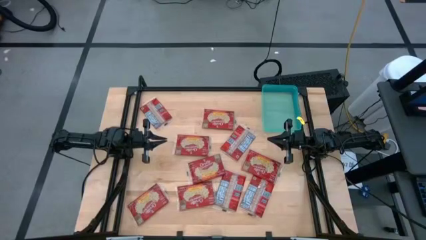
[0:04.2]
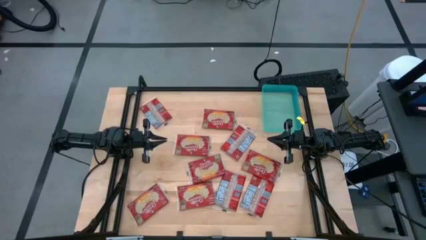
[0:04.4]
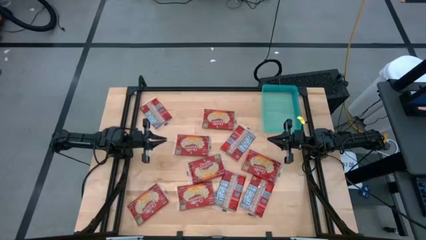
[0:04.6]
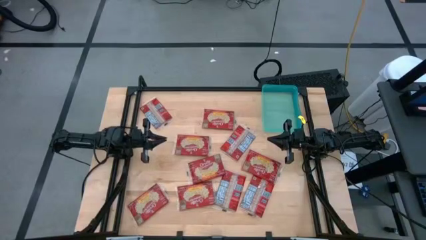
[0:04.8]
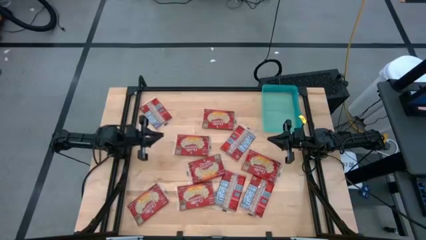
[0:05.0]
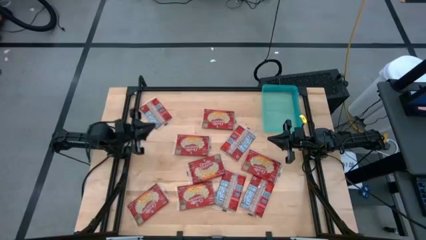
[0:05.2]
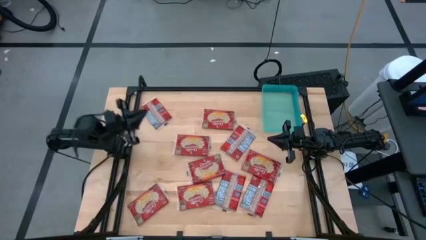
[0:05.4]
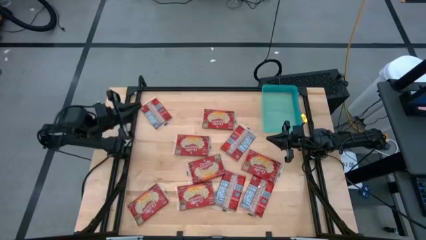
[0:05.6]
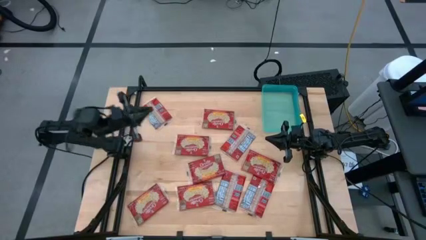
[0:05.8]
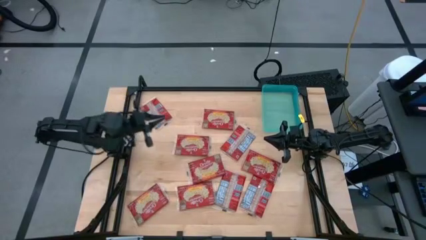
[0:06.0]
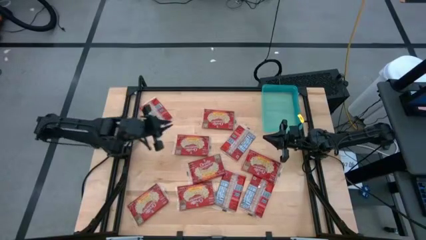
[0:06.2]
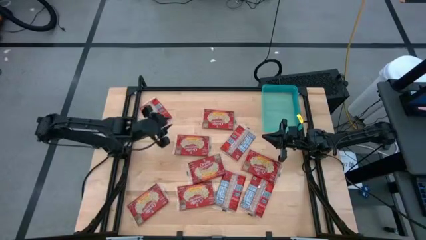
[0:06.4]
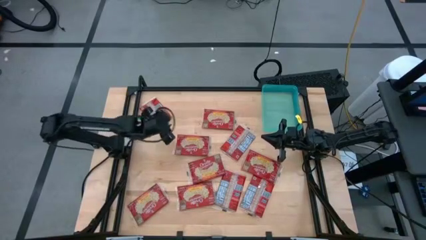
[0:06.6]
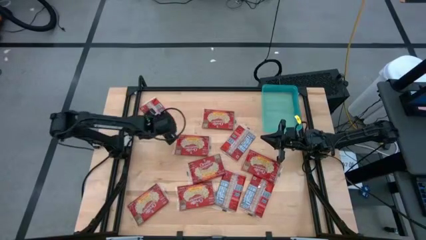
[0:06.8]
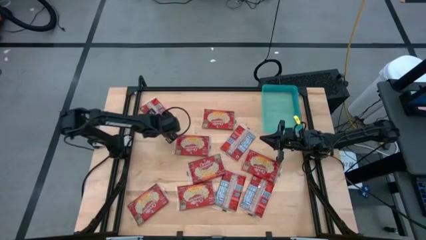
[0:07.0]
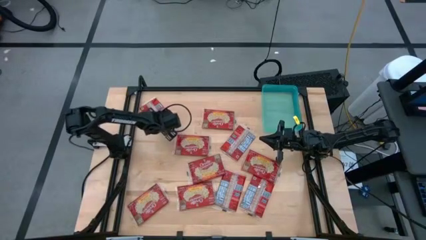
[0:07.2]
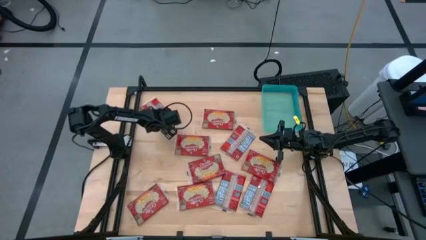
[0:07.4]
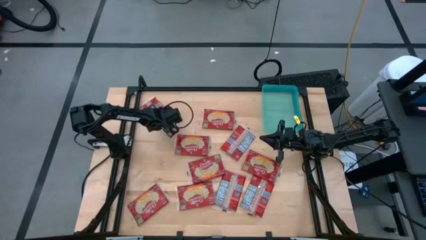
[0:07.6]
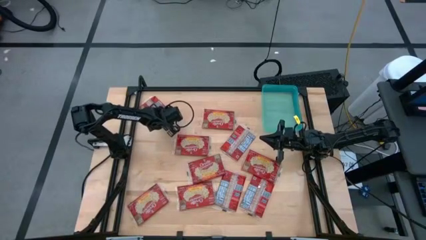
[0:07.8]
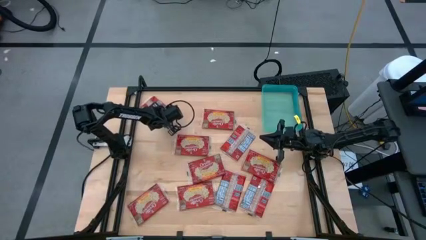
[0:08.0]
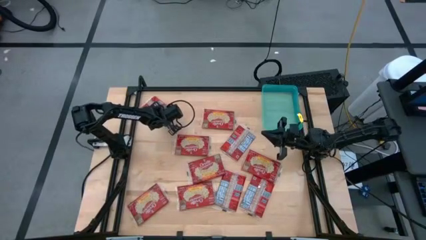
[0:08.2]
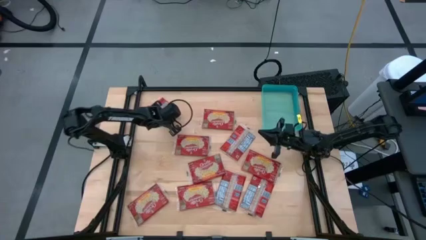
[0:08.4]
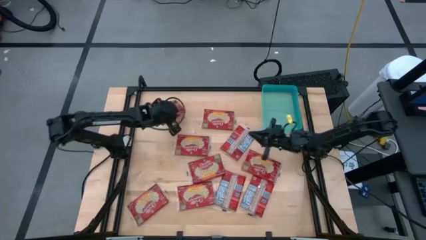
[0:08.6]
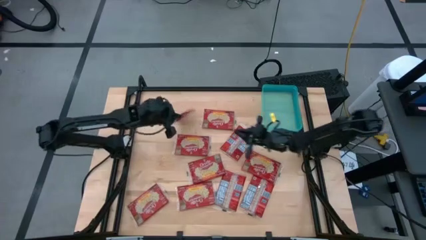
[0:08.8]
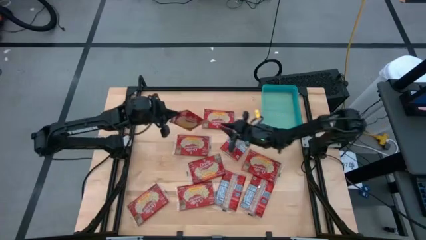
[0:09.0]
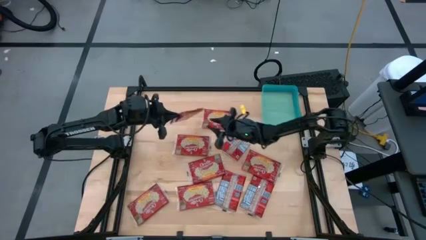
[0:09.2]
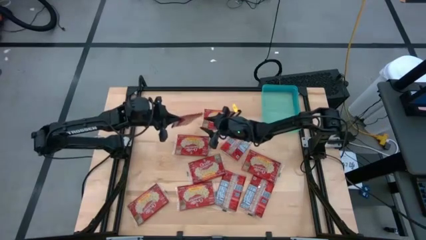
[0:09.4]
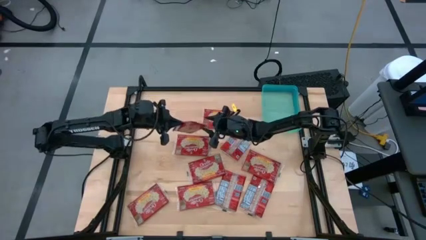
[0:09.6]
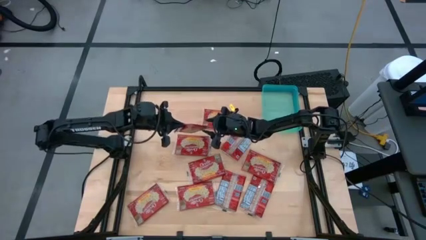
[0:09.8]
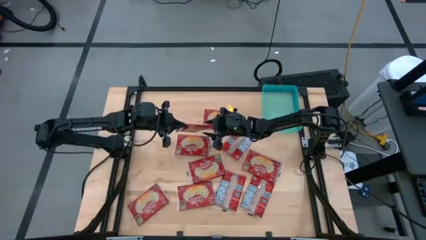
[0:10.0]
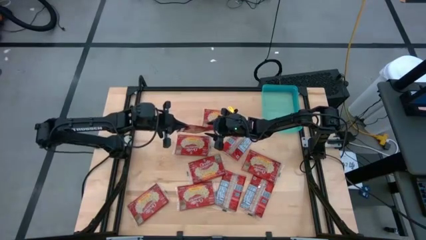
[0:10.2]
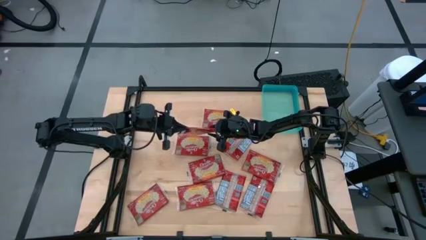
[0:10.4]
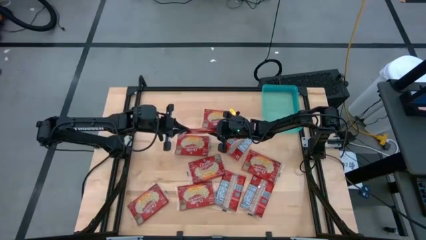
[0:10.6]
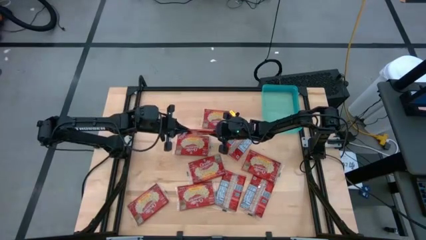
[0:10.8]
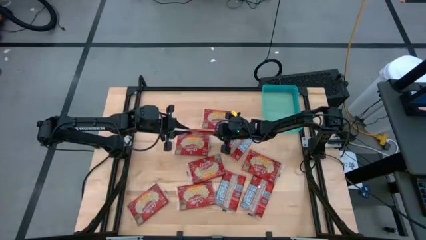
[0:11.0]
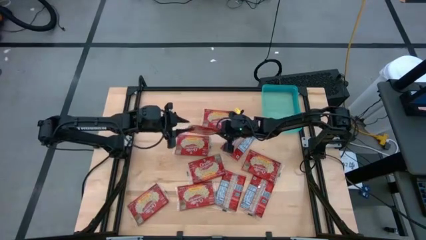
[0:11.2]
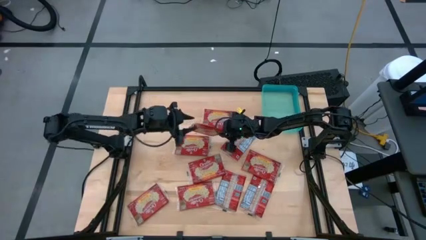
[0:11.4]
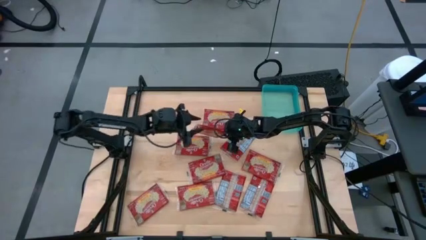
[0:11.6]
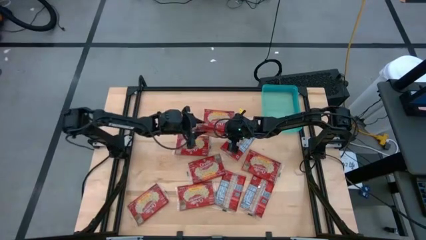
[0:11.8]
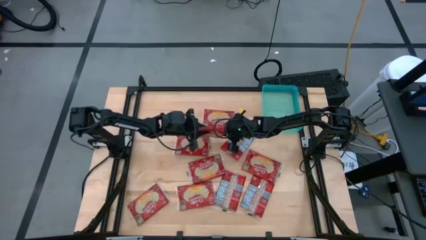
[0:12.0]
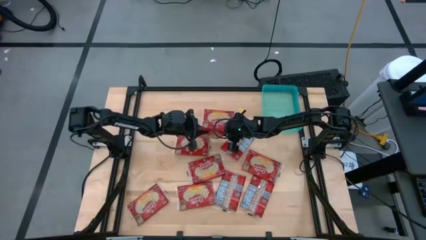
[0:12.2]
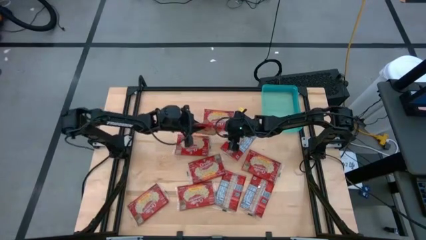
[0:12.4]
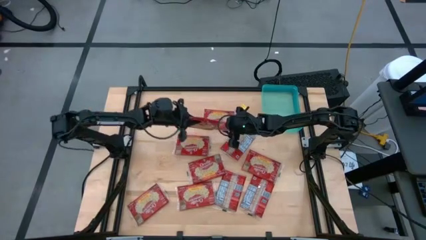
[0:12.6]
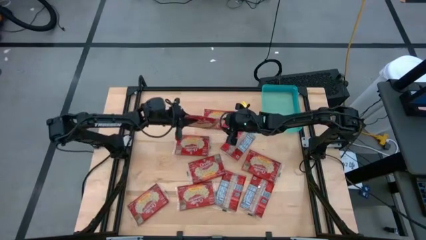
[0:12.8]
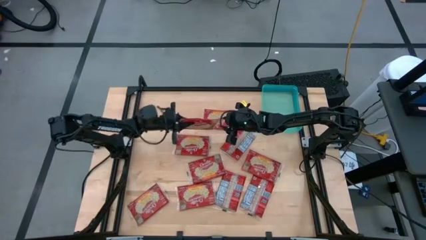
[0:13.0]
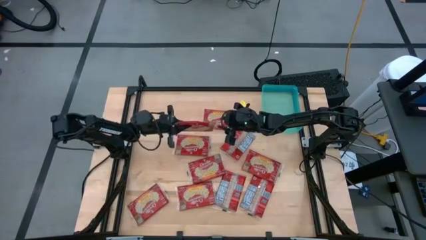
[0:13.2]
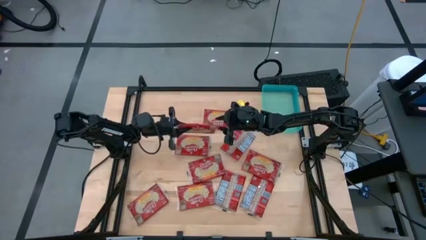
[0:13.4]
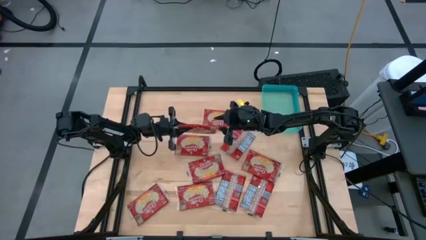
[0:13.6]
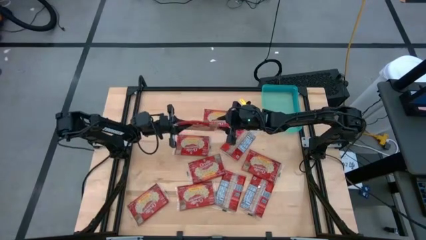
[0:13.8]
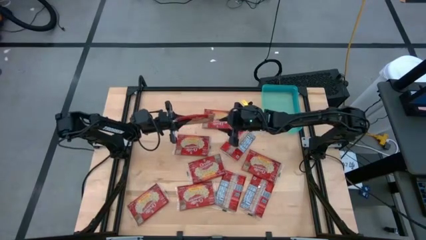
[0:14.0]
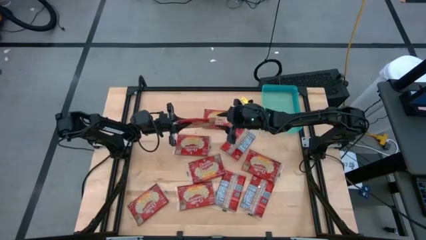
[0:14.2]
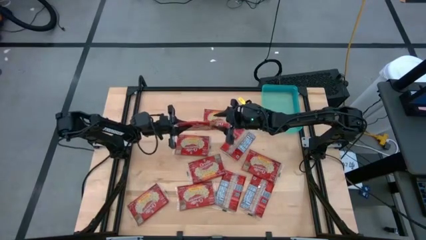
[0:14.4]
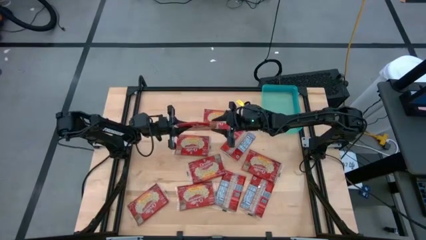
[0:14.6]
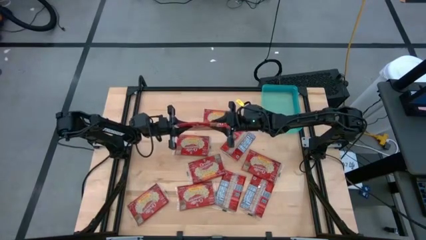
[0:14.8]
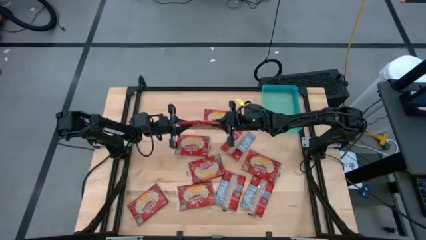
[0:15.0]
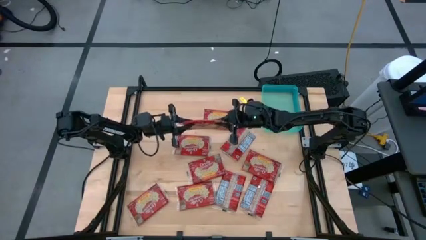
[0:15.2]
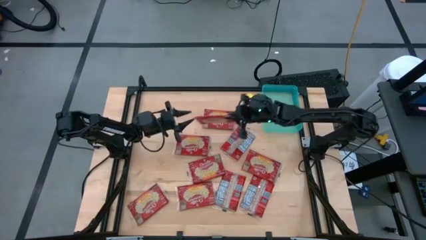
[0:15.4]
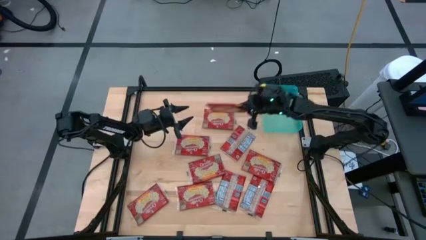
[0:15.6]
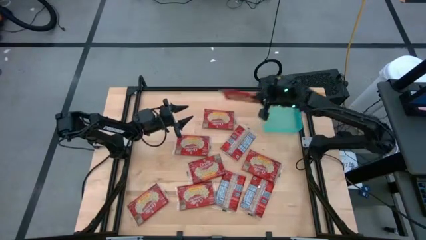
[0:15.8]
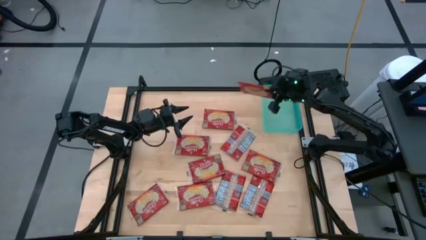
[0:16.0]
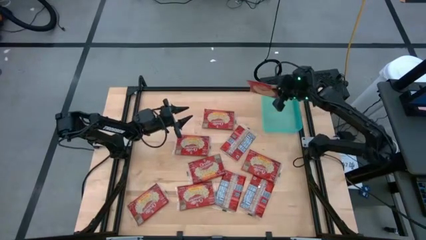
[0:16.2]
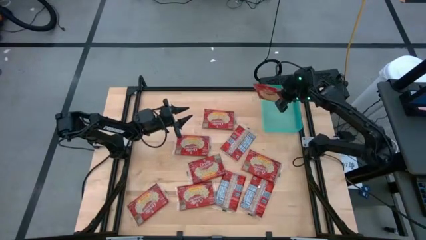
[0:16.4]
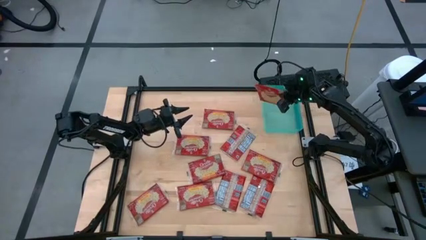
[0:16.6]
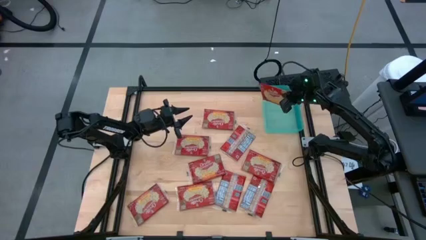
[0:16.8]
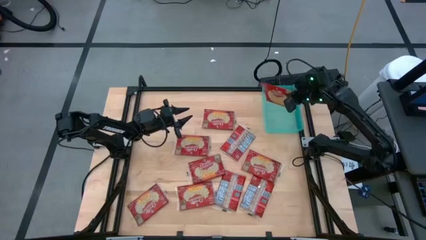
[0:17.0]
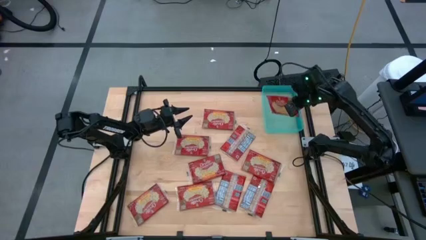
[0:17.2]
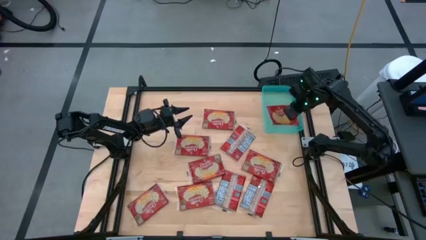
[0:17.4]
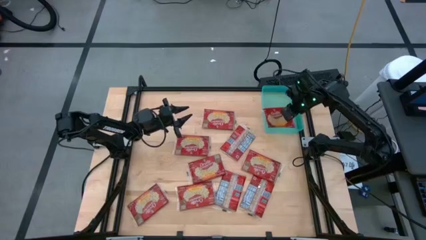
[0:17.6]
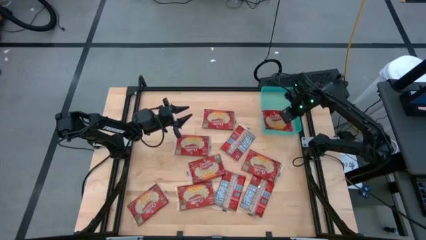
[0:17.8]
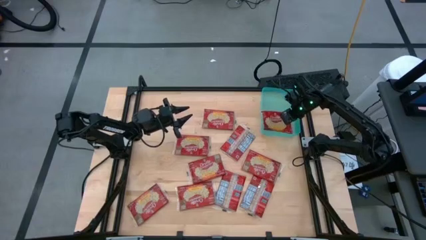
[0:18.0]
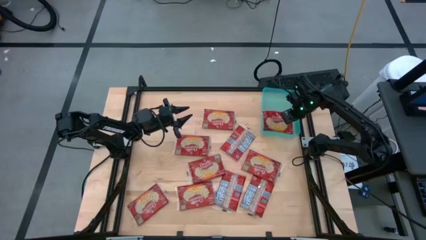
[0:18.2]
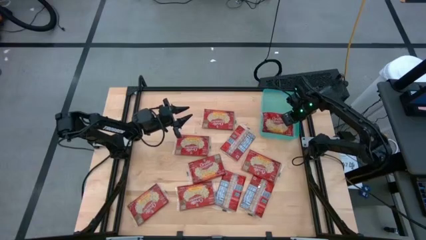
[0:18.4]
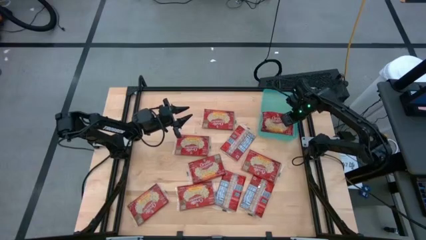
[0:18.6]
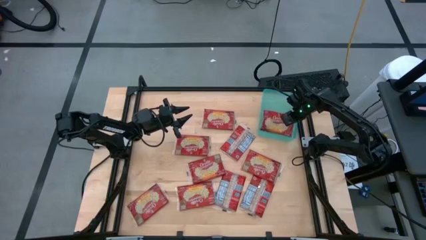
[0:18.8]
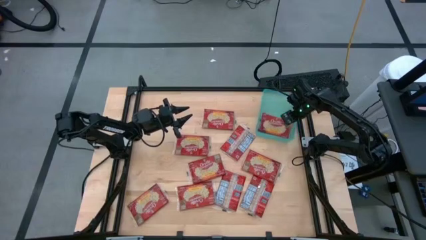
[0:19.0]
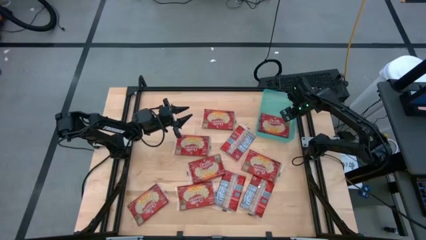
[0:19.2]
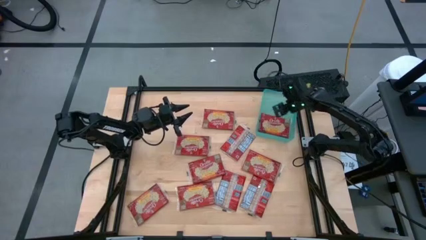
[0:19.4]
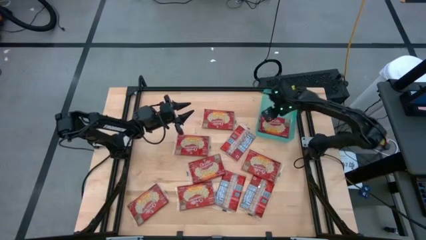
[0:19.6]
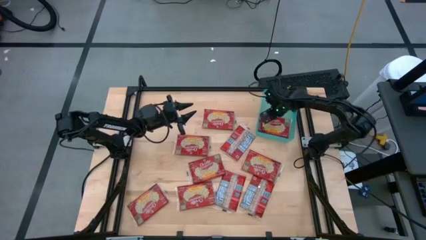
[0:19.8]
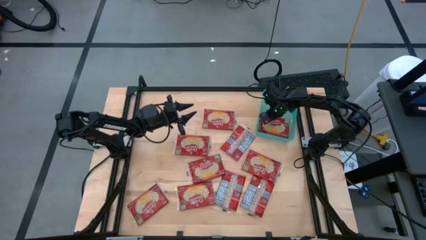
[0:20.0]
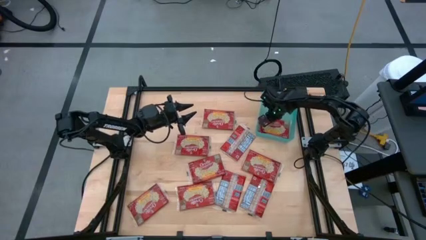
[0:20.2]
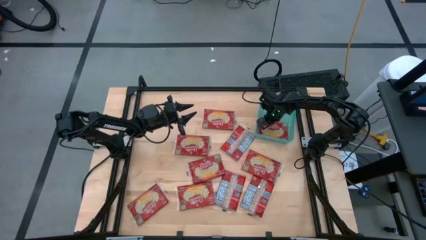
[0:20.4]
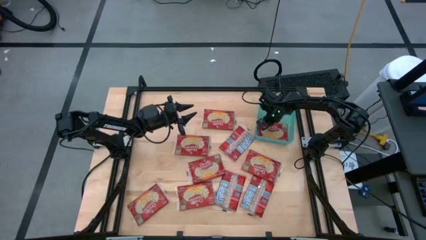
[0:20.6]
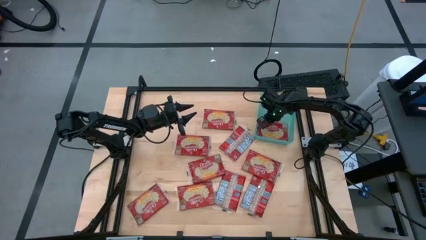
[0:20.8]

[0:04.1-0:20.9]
Task: Sort popcorn bags into baskets
Put the red popcorn bag into the green bin

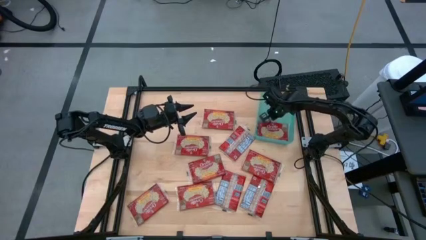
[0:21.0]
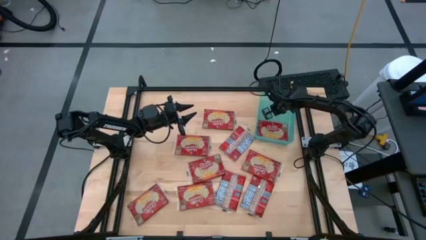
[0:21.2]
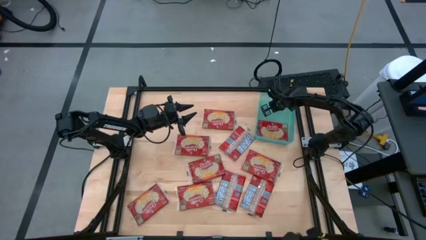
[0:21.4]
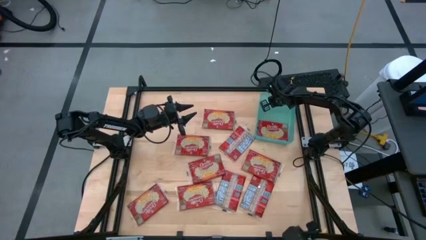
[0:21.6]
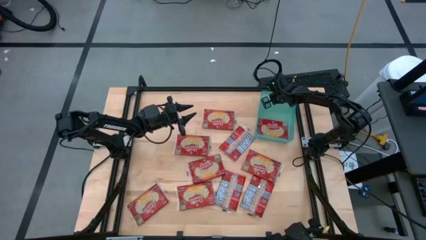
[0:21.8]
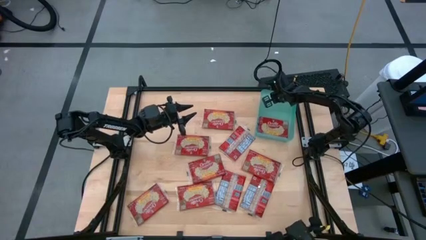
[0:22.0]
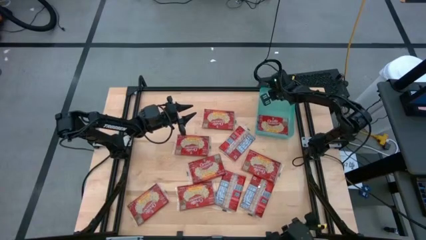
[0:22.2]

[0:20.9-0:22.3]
Adjust the green bin
